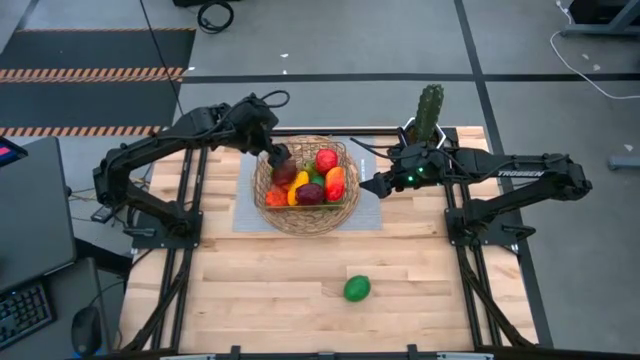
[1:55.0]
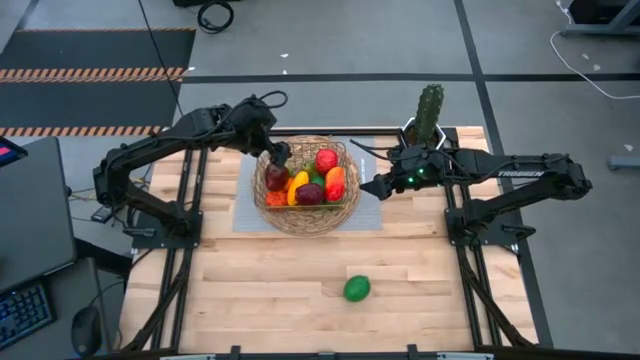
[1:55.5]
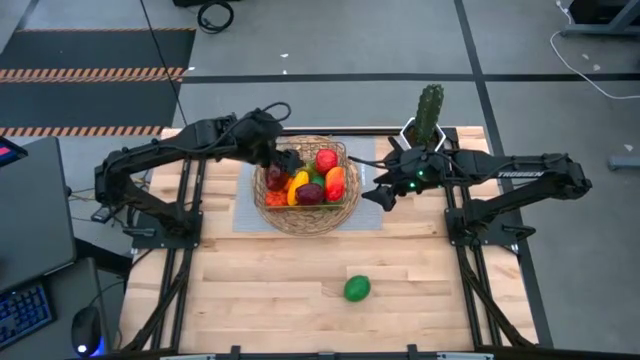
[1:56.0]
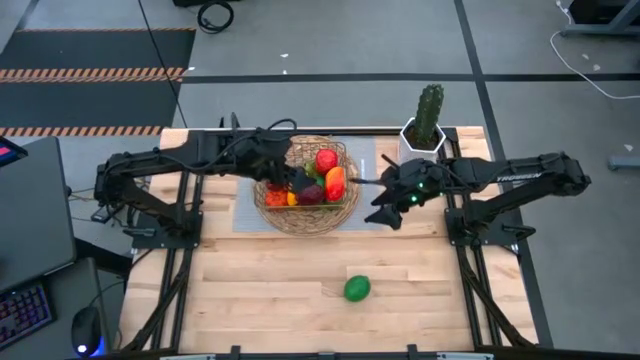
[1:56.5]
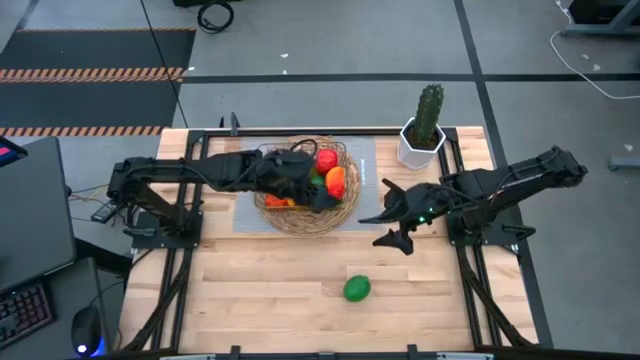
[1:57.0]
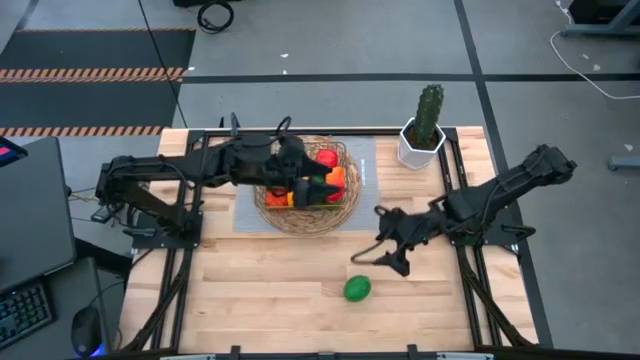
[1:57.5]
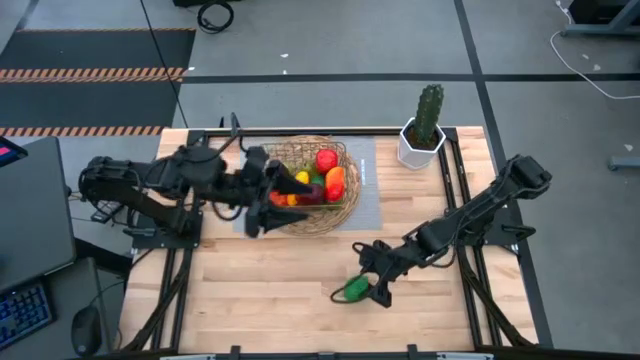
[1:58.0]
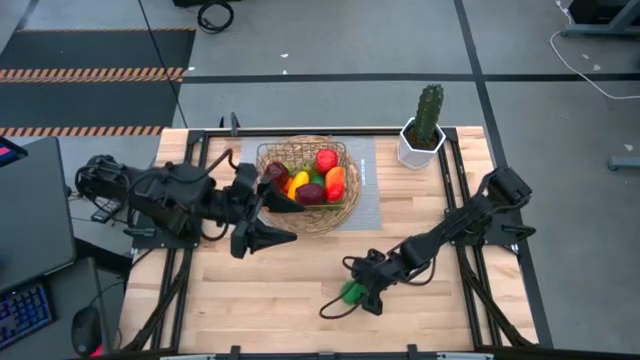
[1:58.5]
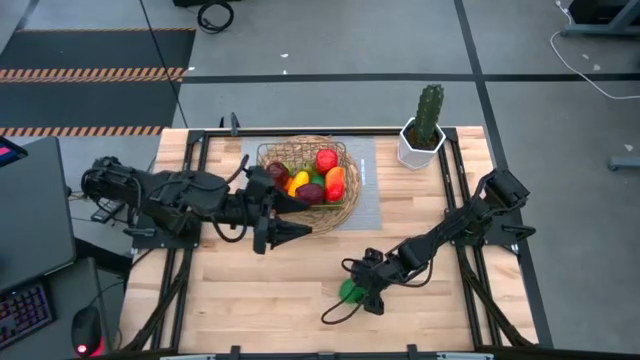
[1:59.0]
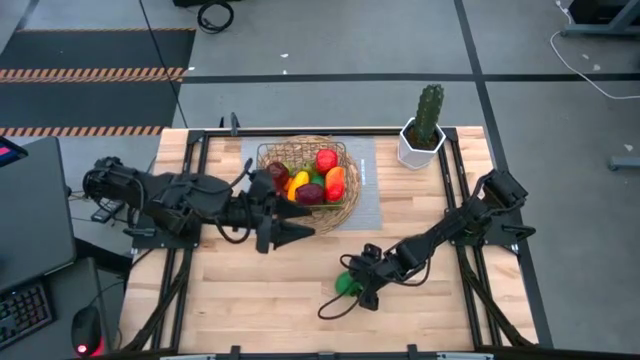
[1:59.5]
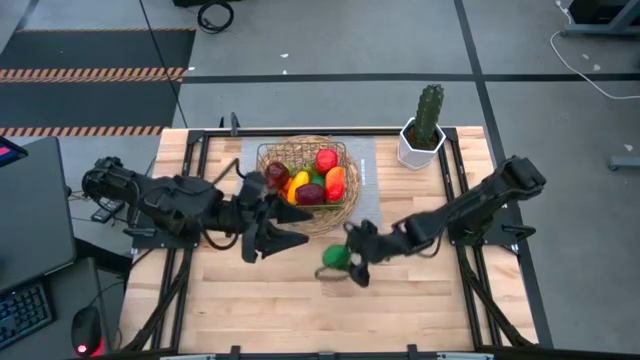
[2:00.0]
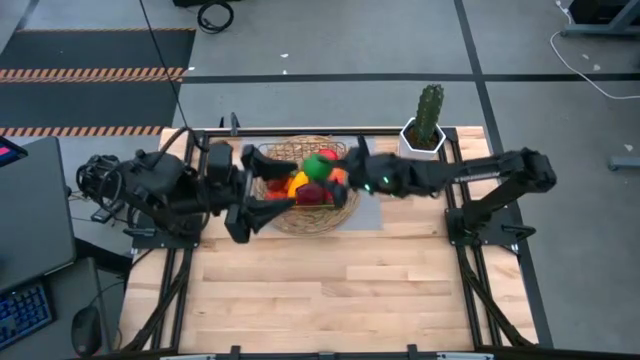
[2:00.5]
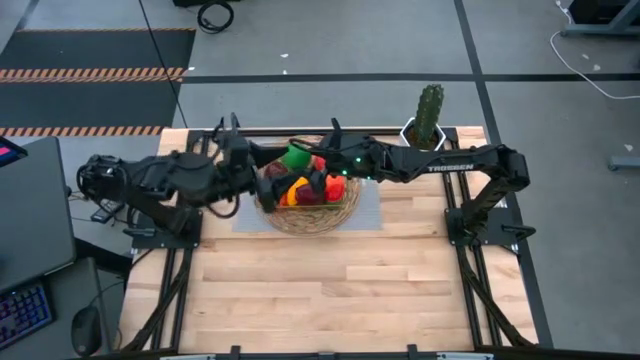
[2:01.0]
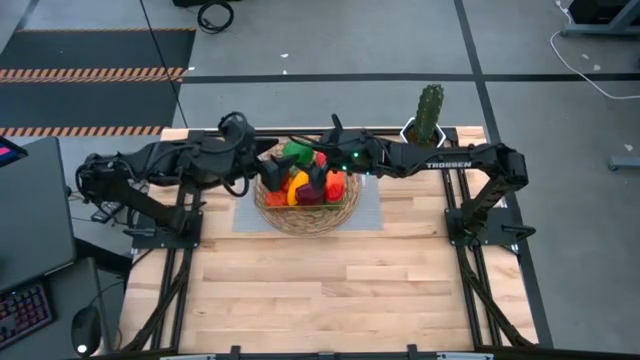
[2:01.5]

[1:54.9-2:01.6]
Task: Build produce basket
Put the lime into the gold wire basket

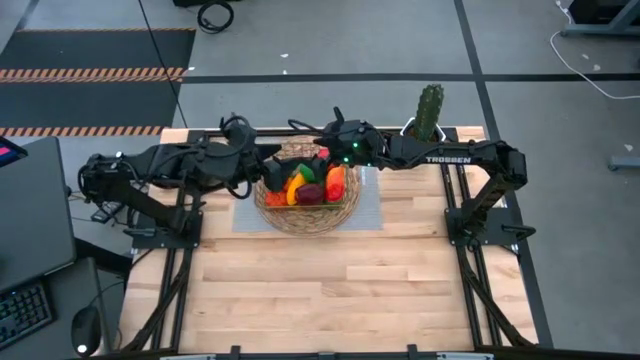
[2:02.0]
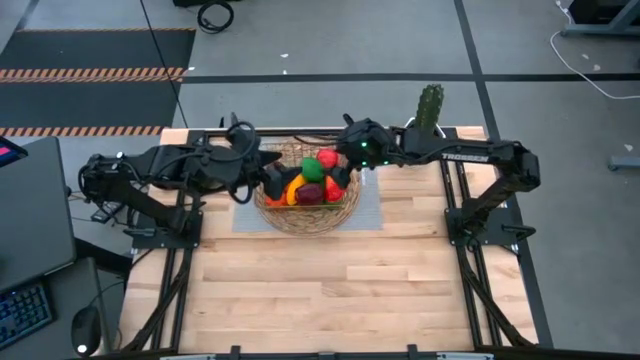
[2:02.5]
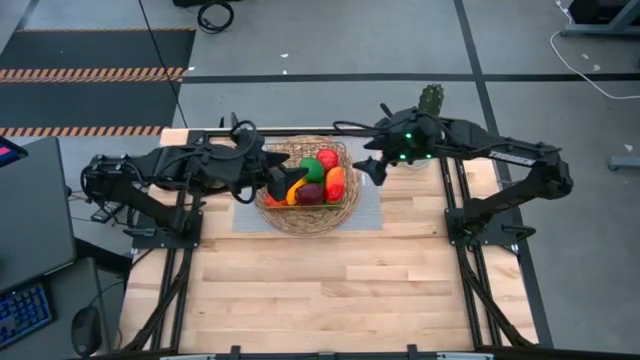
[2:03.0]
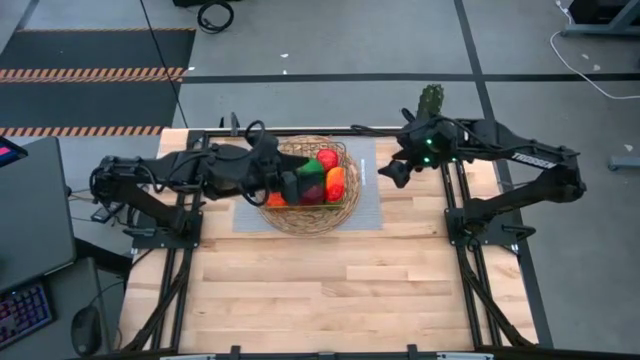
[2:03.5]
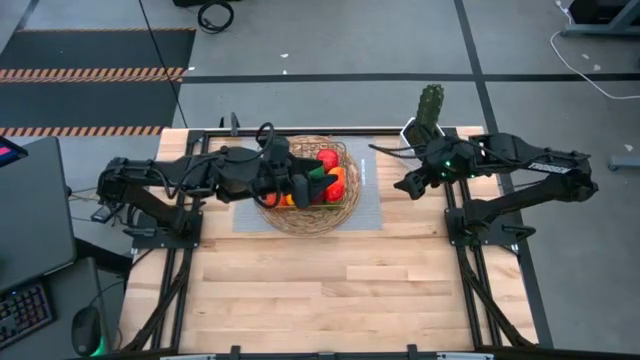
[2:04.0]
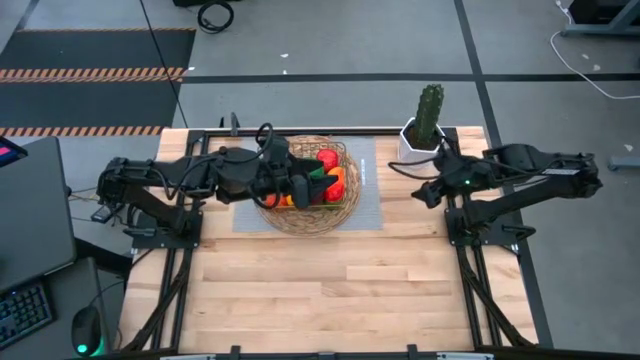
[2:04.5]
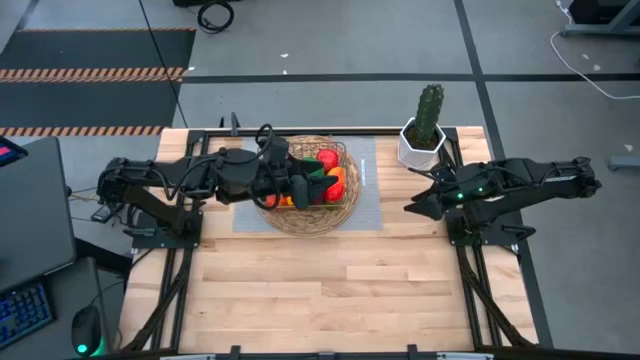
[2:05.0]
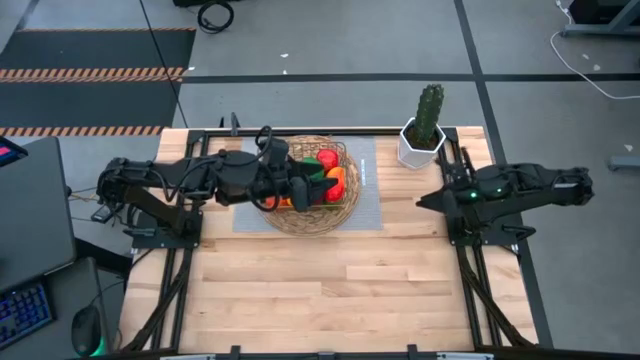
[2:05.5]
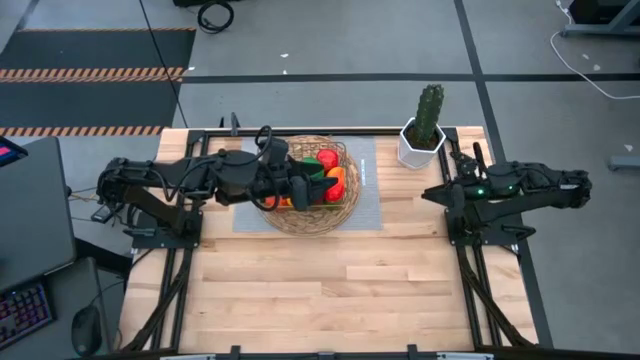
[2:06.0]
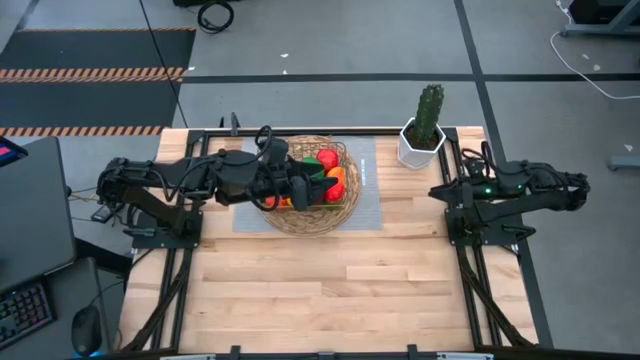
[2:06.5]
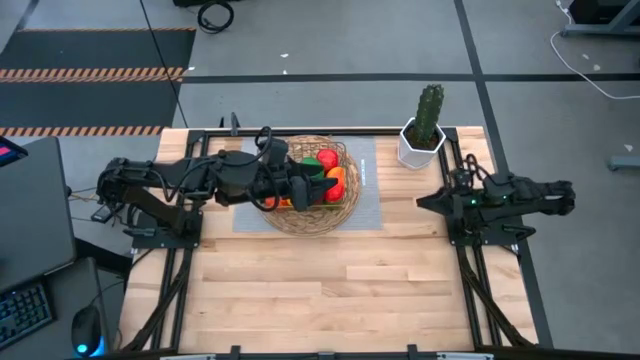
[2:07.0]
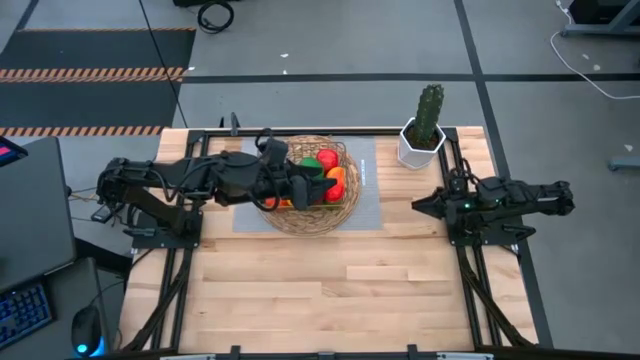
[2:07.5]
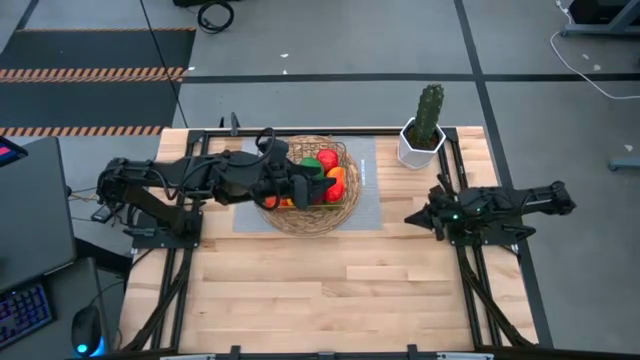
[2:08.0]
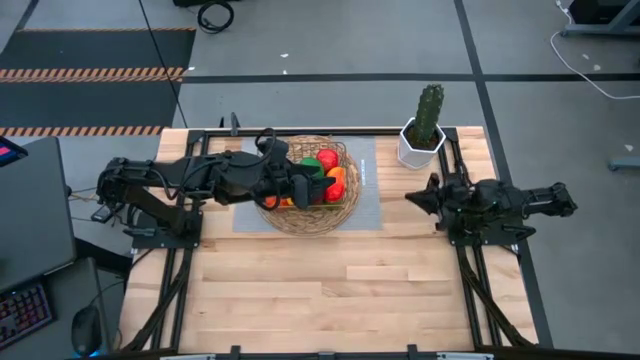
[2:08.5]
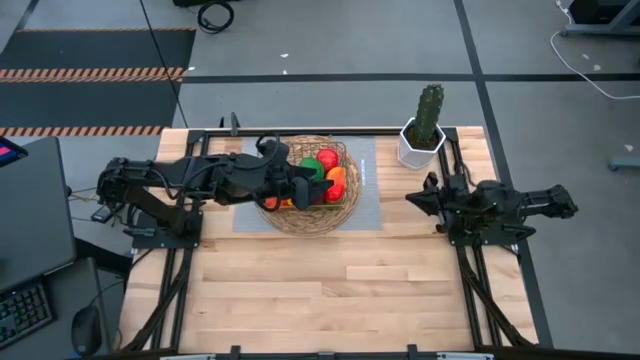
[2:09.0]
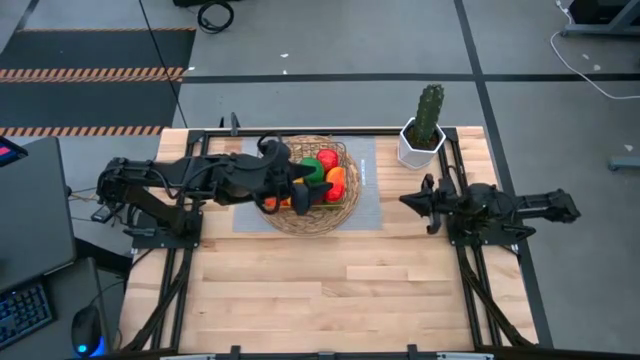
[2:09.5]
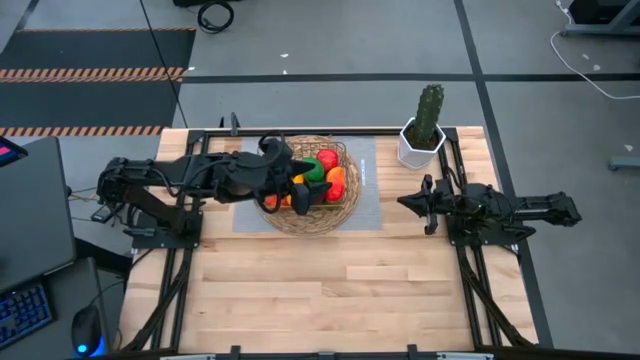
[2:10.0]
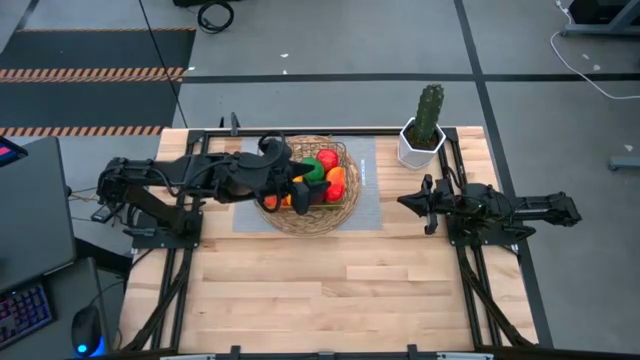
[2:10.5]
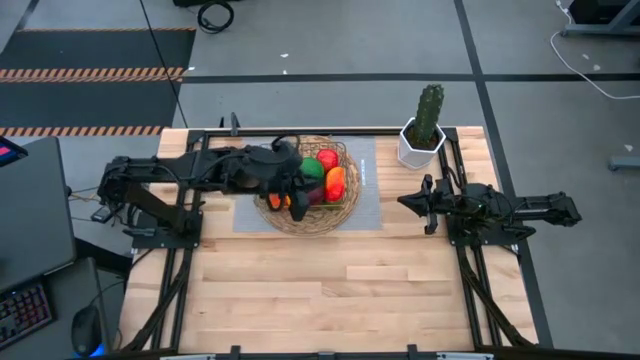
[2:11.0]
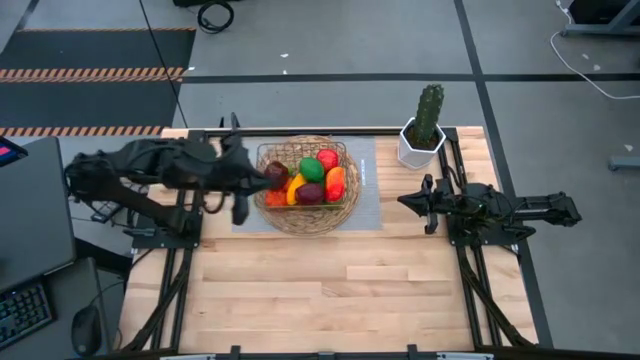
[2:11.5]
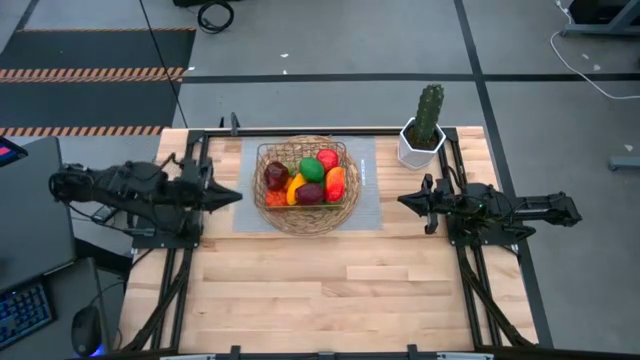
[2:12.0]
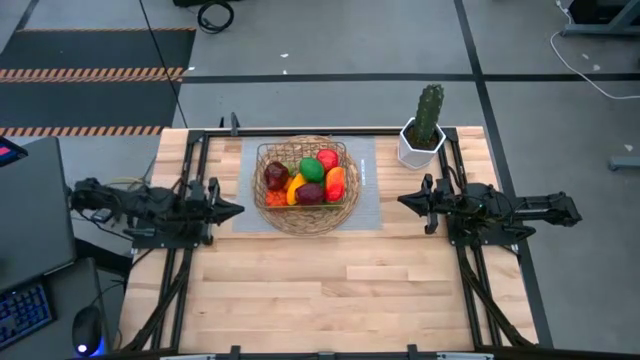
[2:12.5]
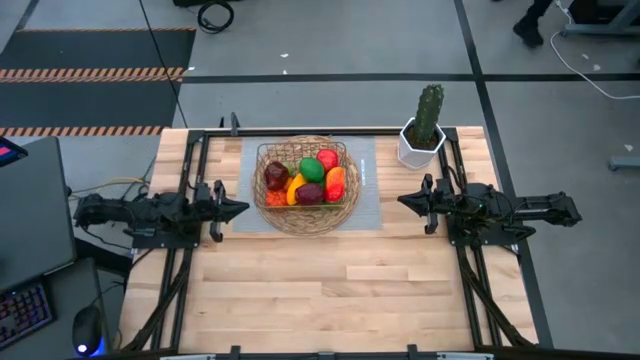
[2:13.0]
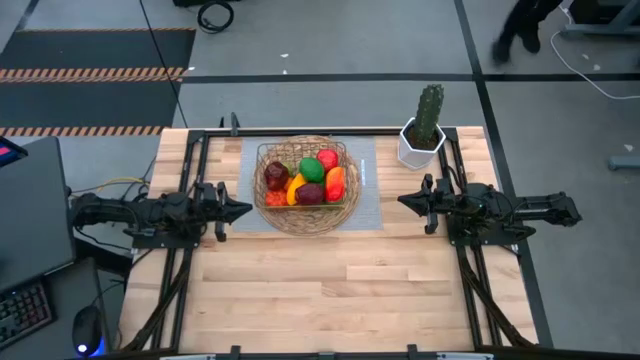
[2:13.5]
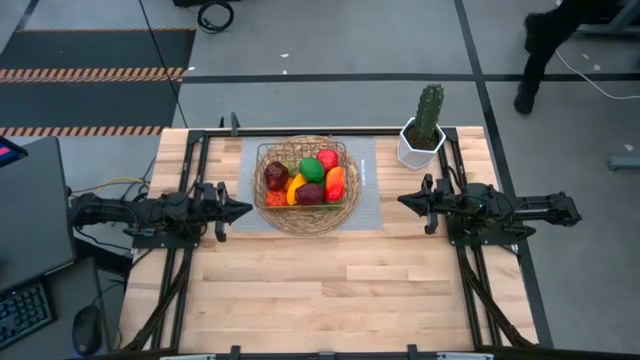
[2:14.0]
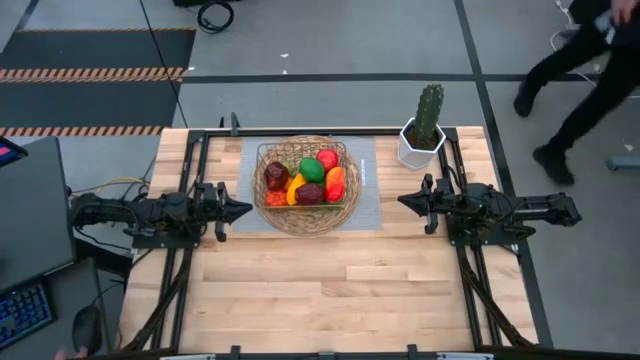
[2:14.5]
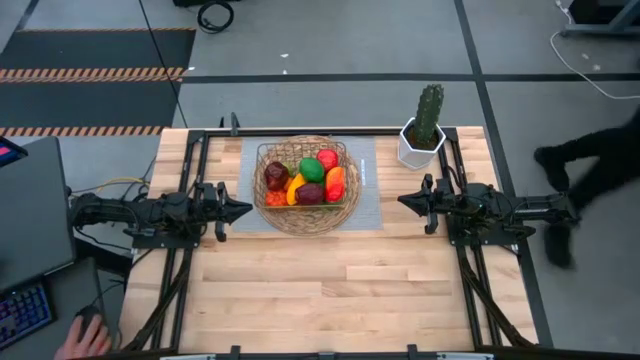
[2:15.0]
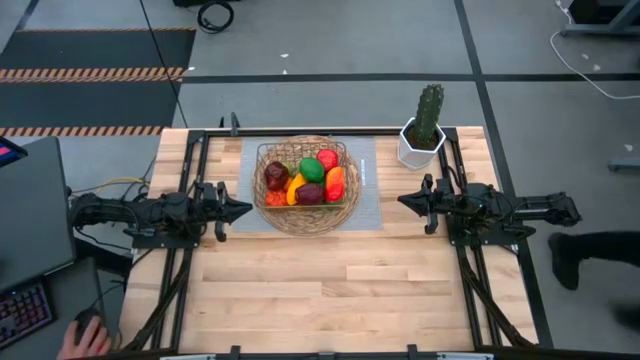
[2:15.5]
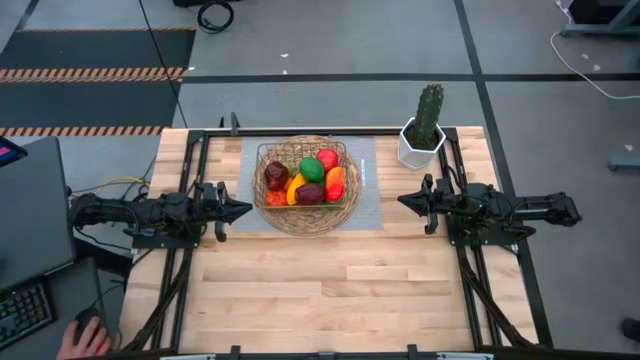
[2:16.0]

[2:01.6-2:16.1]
Return to Home Position
